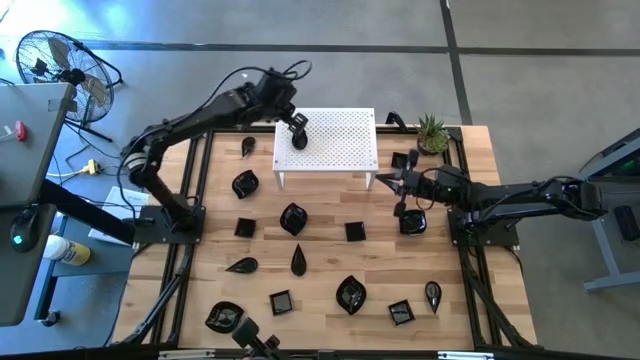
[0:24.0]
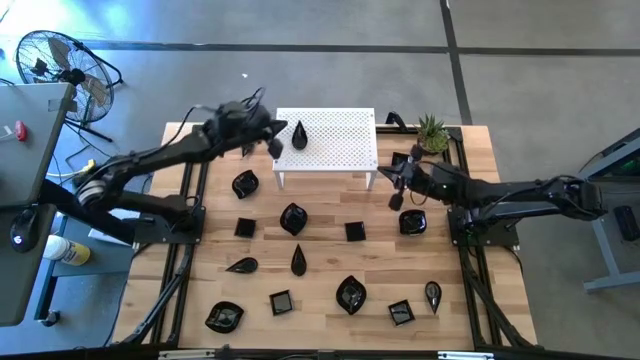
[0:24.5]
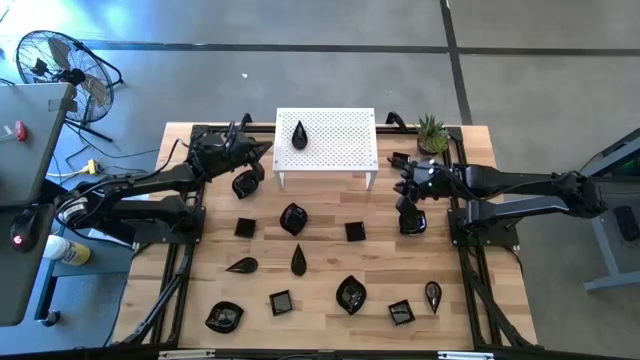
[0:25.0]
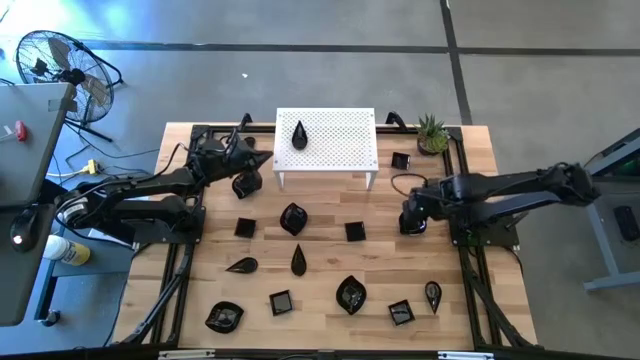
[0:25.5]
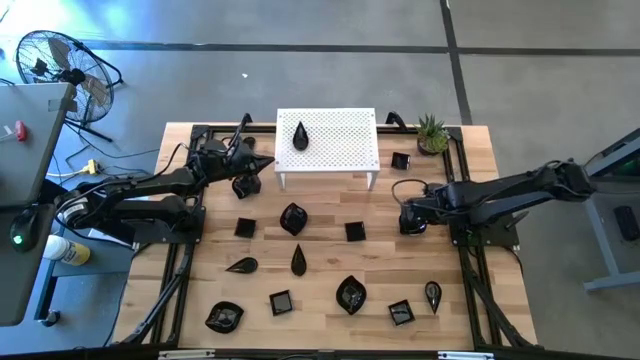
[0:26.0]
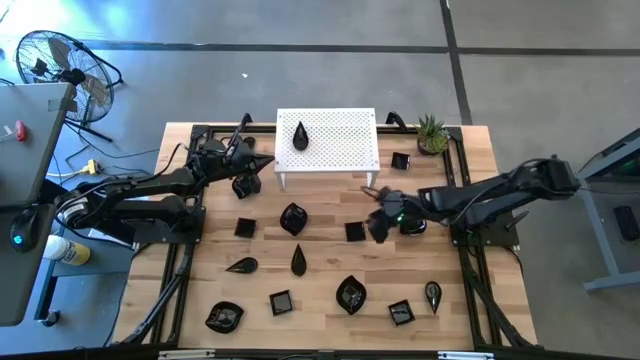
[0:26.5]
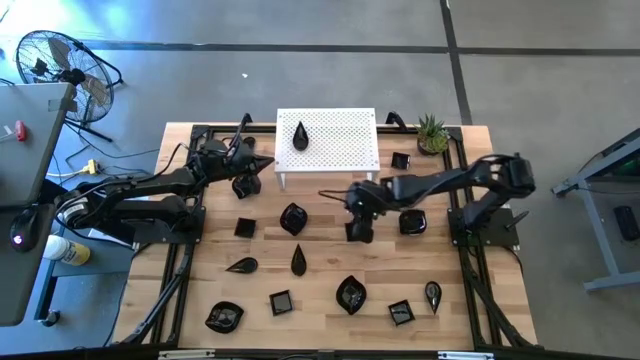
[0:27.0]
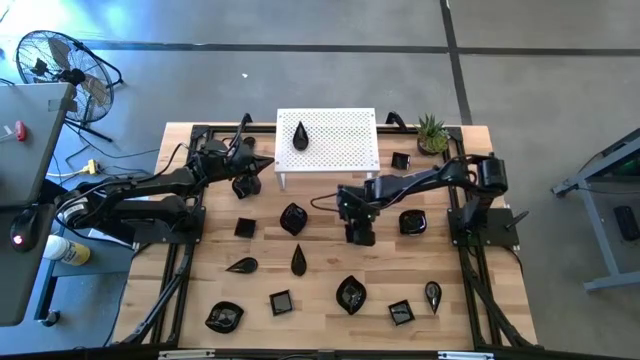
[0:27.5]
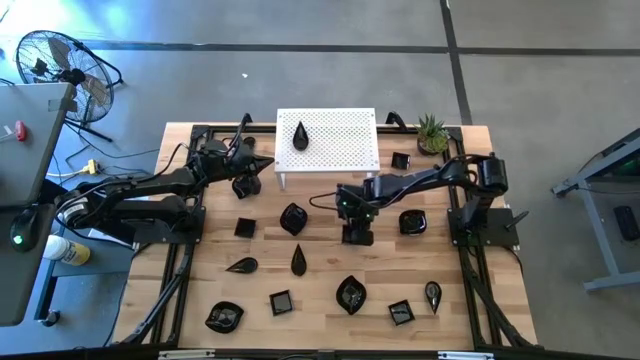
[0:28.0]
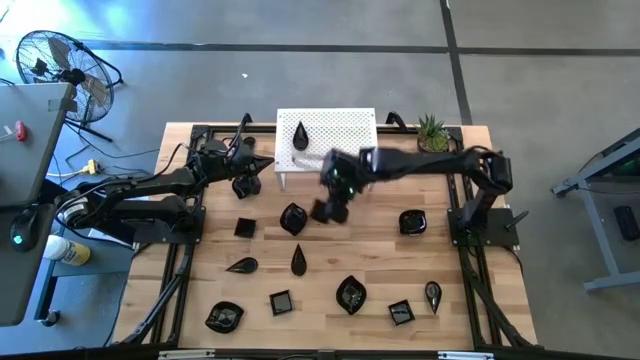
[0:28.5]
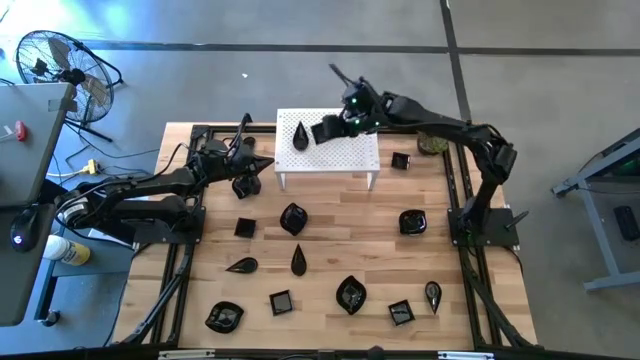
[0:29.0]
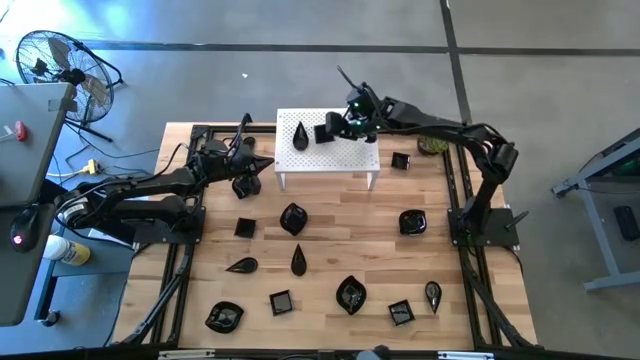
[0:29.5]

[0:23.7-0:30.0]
Task: Pick & Place Mini shaped plates
Put the square bowl on the shelf

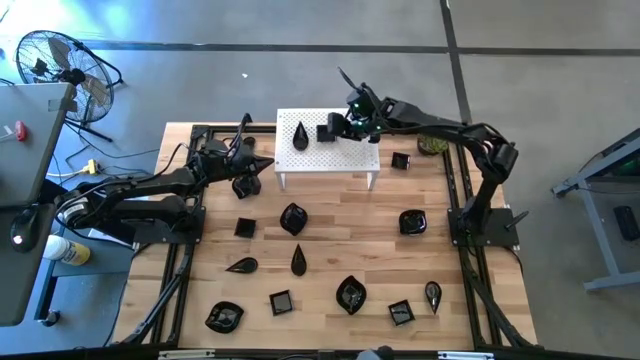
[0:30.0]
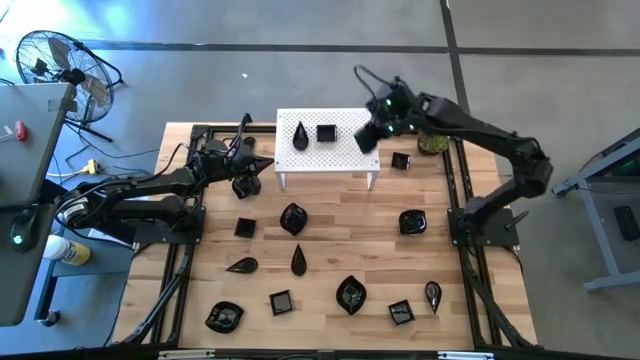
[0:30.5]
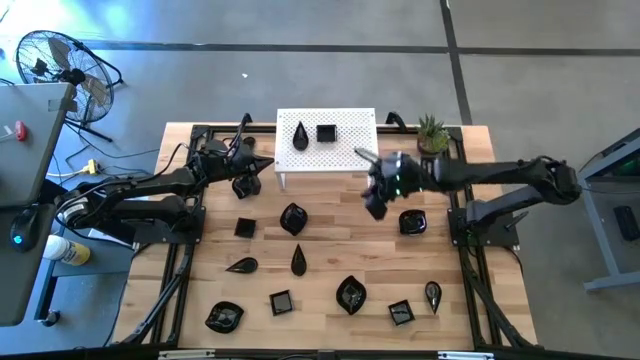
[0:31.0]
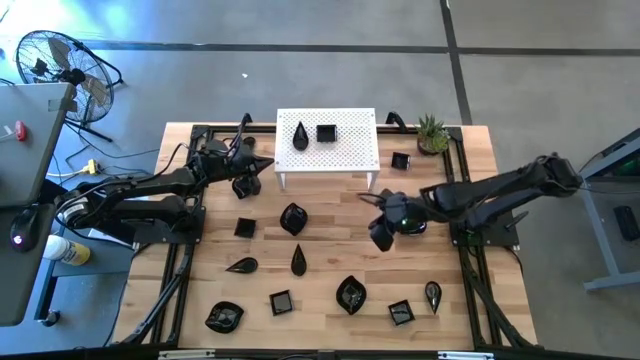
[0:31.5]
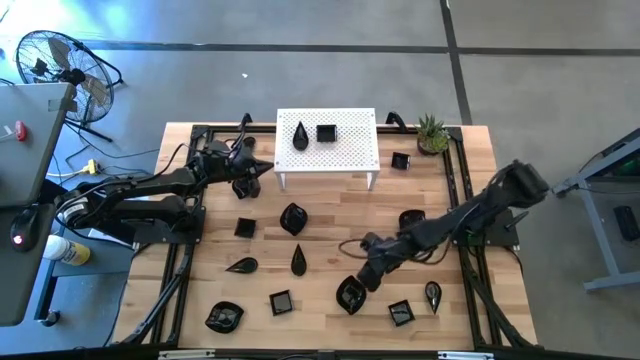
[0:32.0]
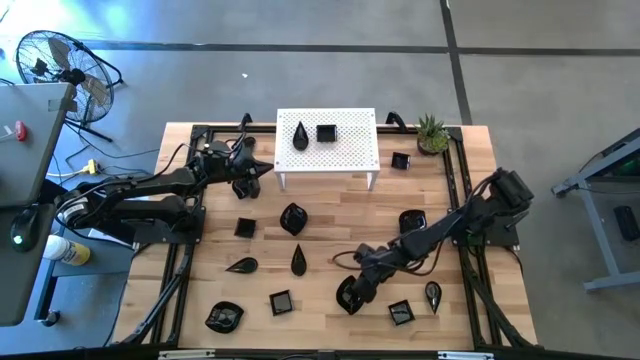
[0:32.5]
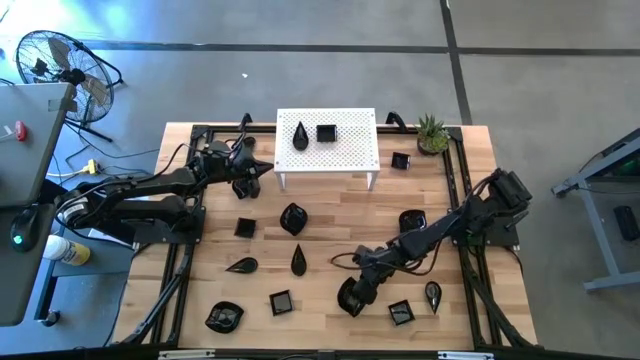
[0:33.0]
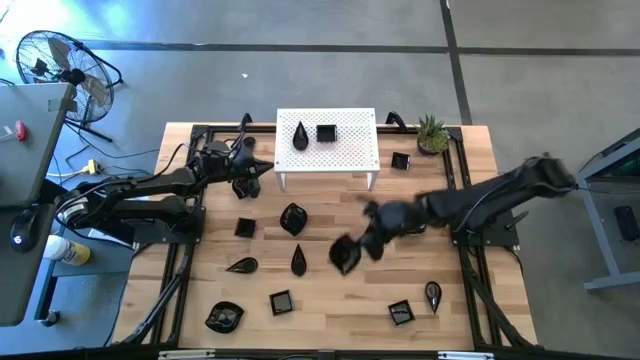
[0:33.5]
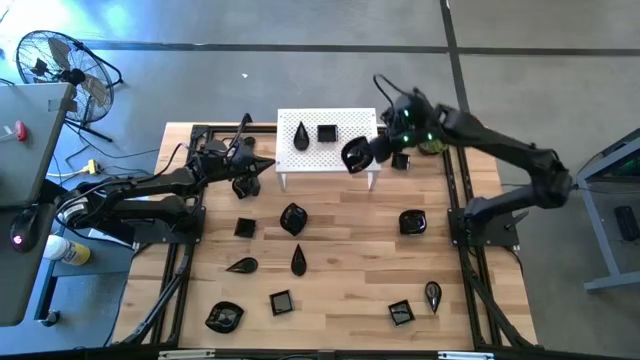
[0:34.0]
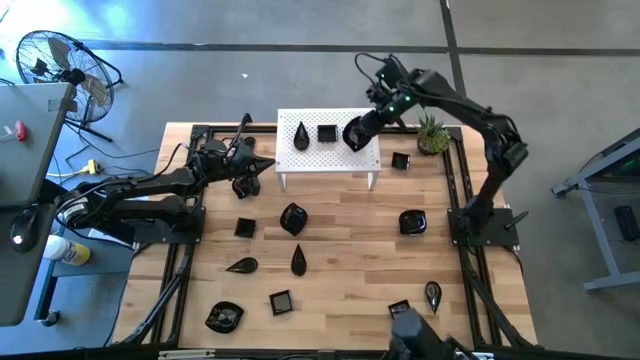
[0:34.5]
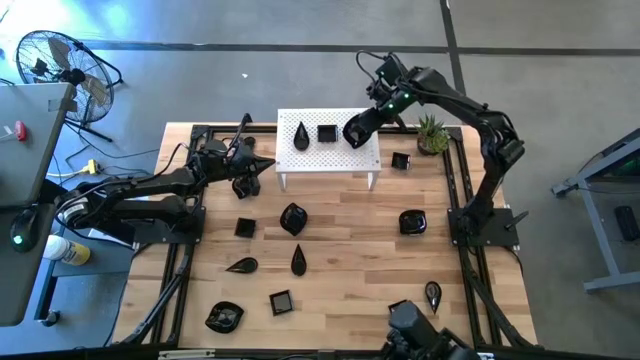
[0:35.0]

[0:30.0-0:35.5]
Put the leaf shaped bowl on the shelf

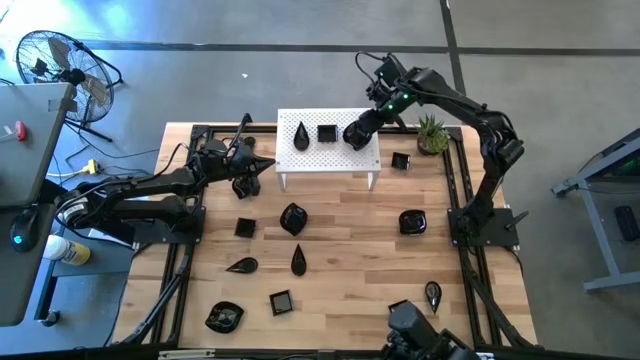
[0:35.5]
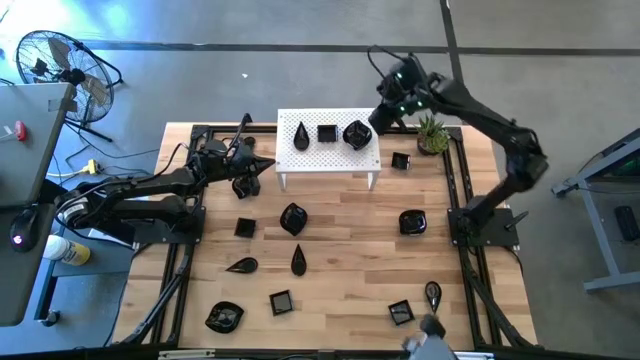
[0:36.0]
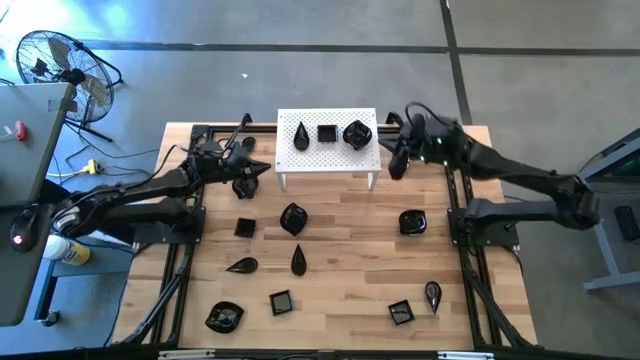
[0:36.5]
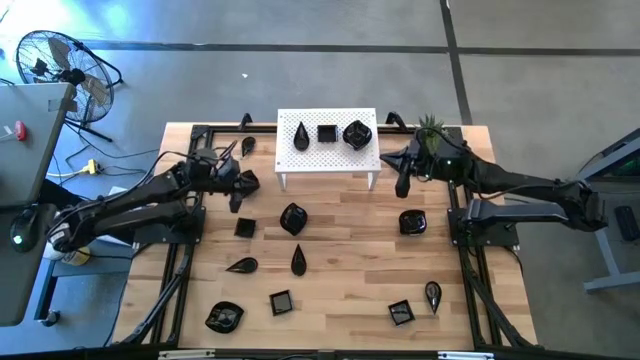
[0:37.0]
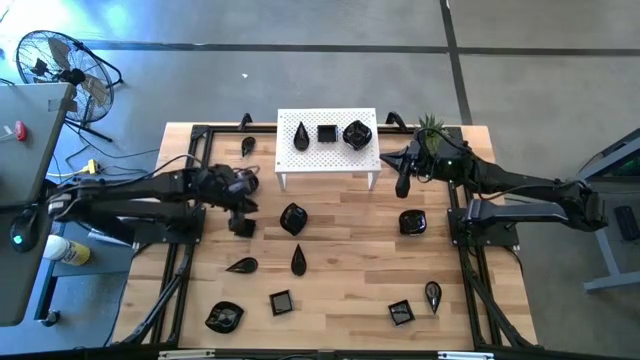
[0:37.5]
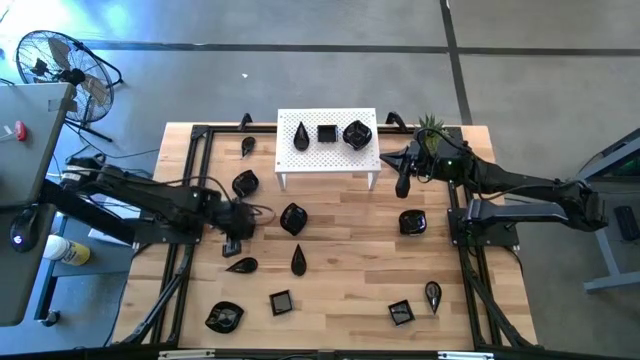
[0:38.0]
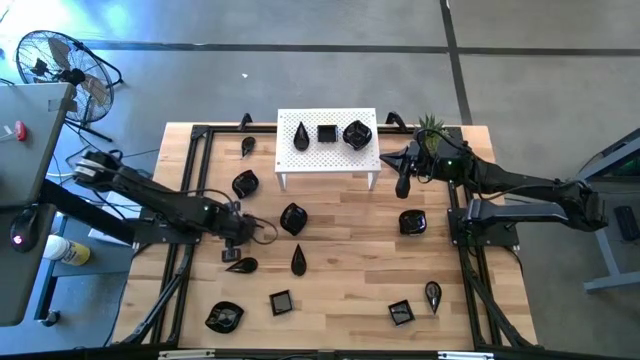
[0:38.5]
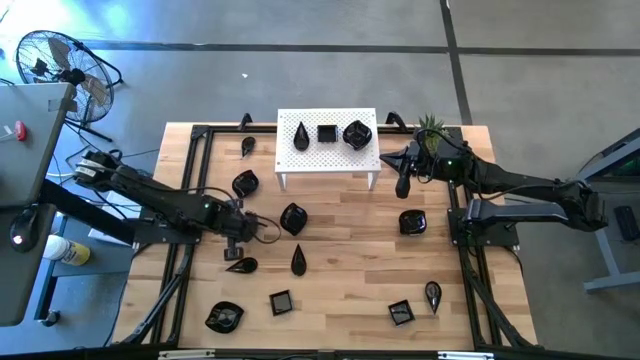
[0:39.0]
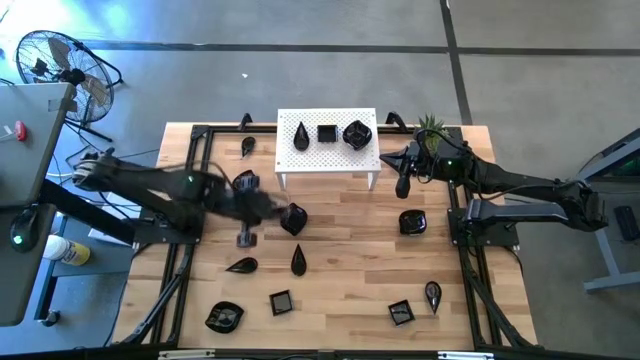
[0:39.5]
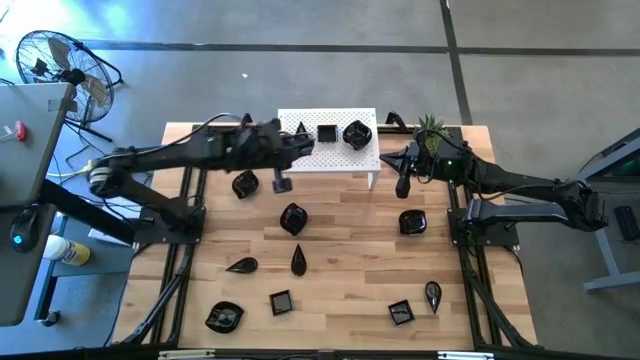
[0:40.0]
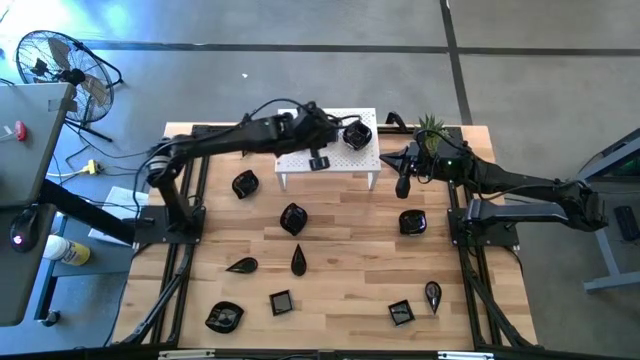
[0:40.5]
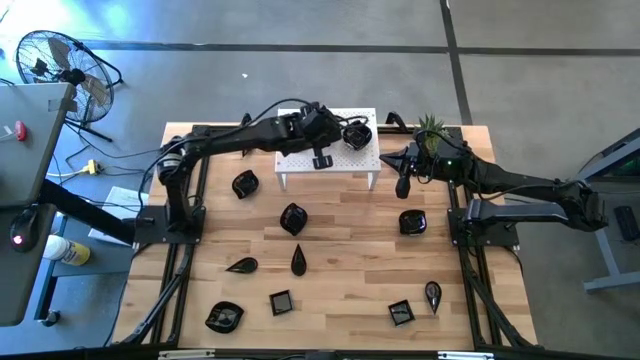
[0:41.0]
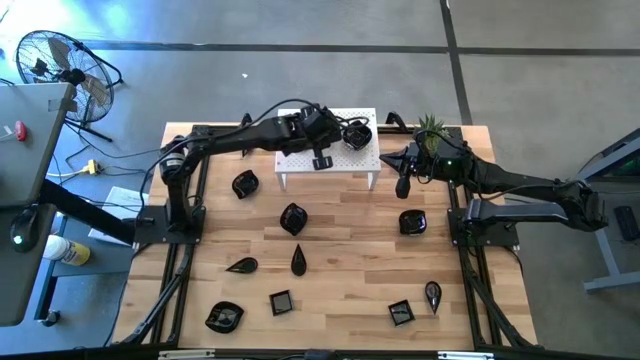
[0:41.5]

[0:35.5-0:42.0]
Stack the square bowl on top of the square bowl on the shelf

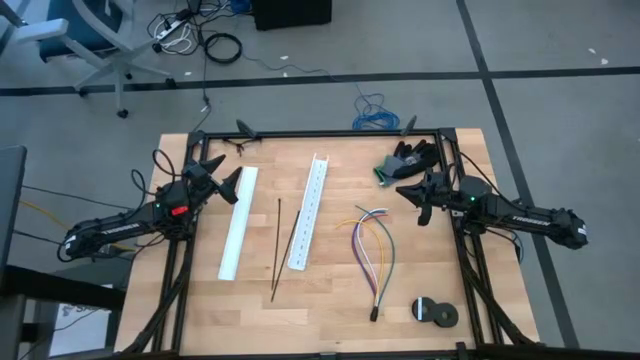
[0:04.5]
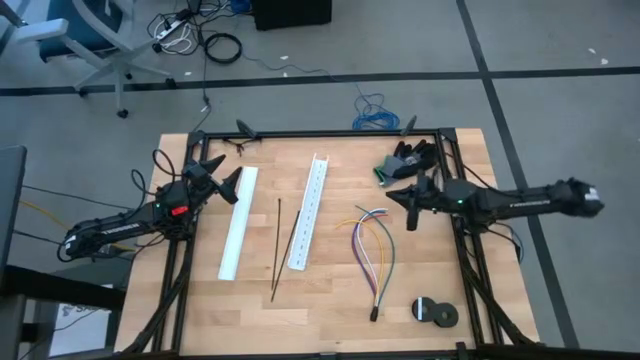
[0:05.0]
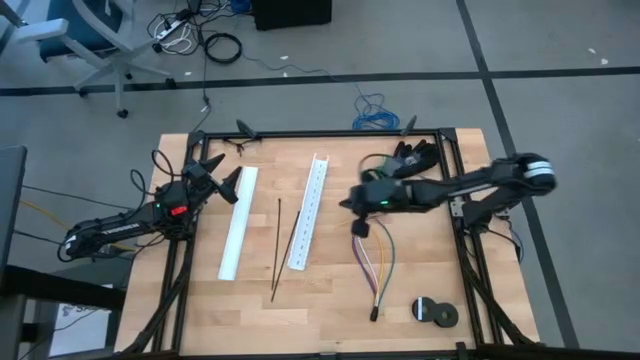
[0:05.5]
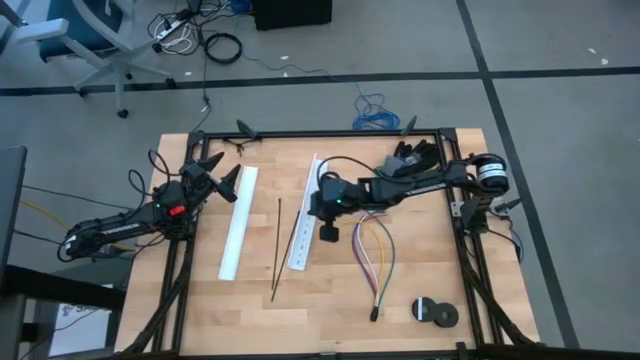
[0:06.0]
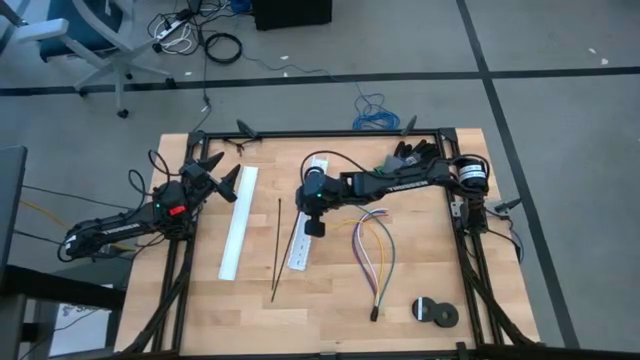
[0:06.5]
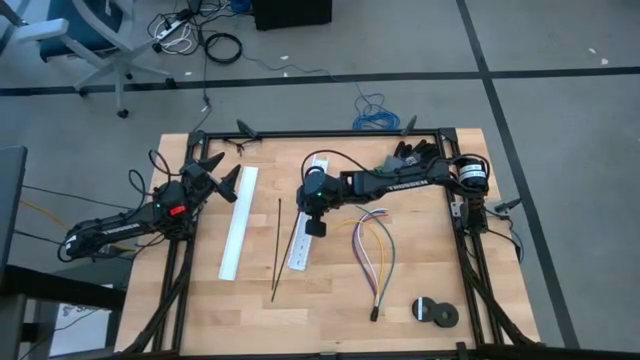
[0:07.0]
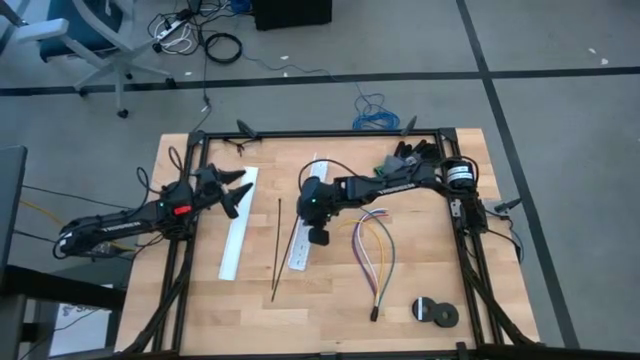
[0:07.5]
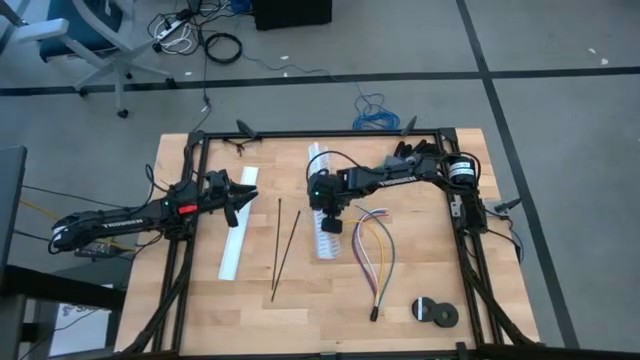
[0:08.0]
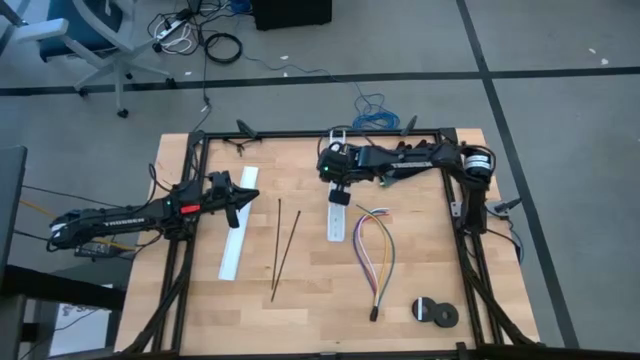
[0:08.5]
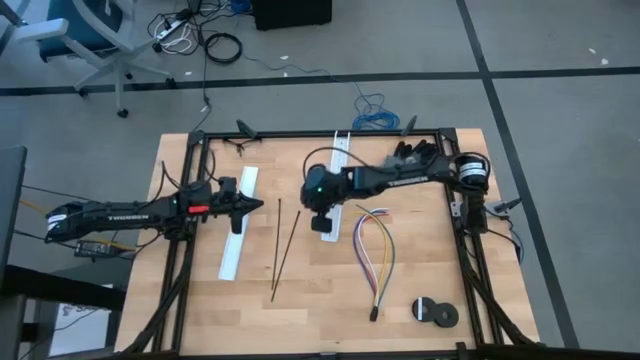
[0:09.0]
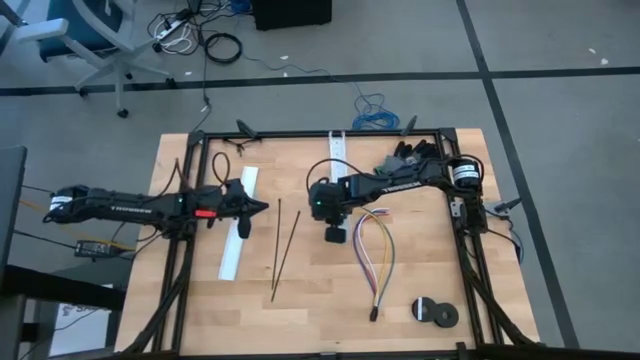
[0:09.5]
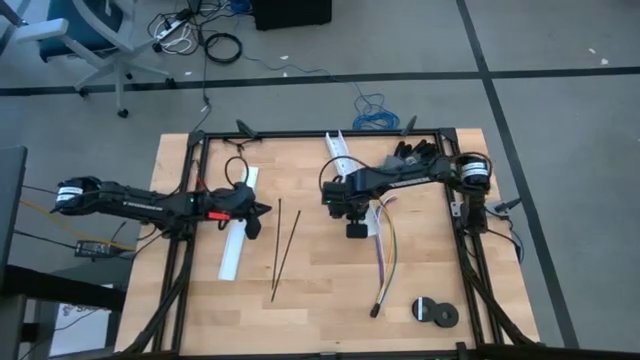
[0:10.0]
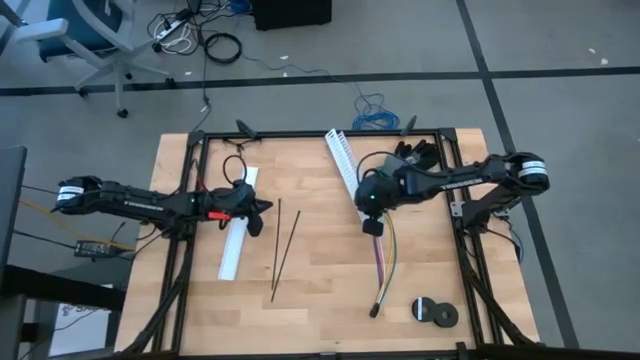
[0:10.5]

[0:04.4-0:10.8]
Task: Ziptie cables
Adjust the white cable duct
